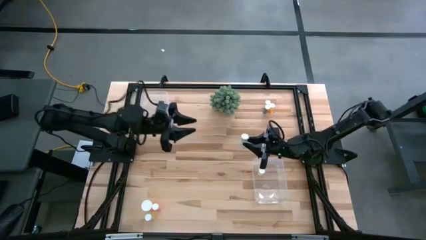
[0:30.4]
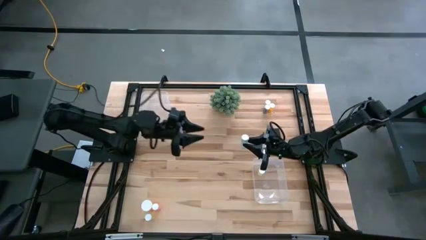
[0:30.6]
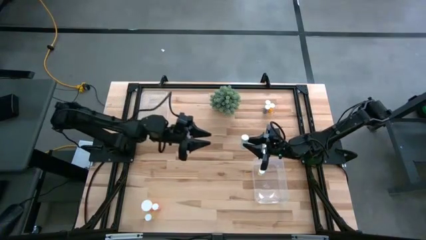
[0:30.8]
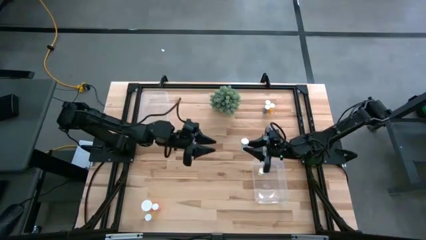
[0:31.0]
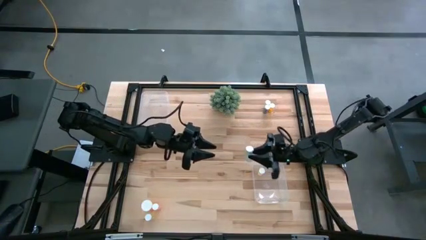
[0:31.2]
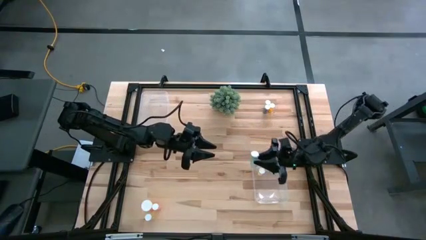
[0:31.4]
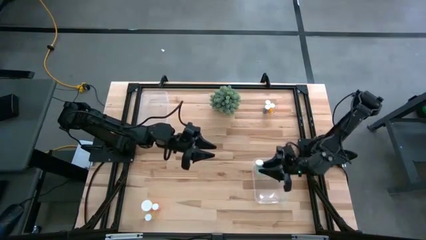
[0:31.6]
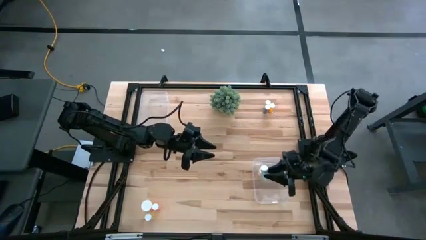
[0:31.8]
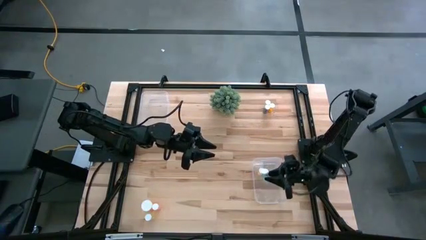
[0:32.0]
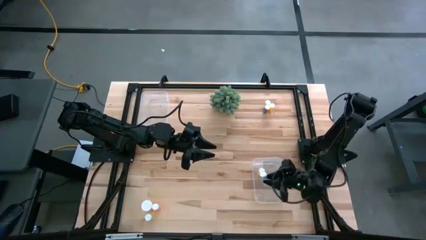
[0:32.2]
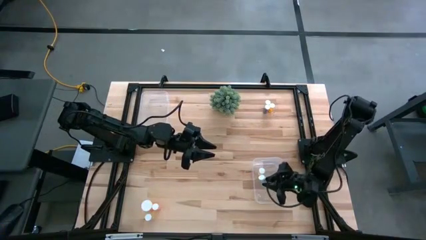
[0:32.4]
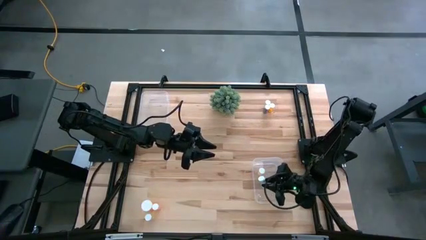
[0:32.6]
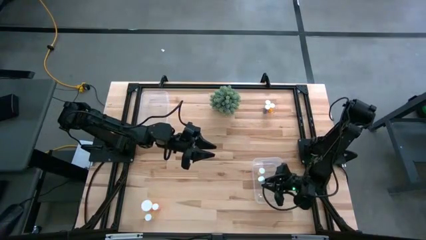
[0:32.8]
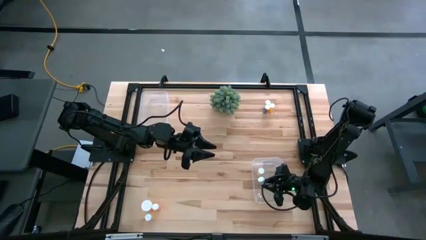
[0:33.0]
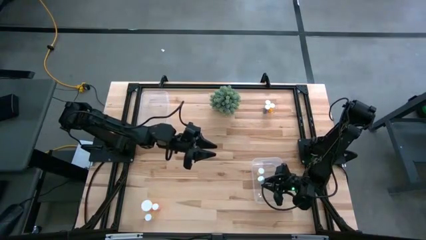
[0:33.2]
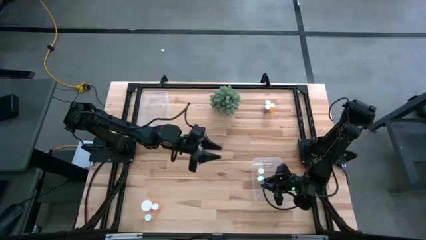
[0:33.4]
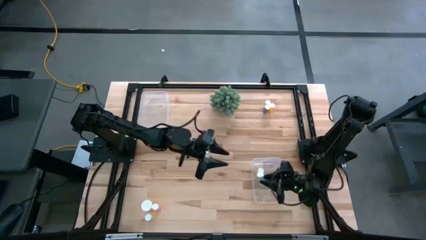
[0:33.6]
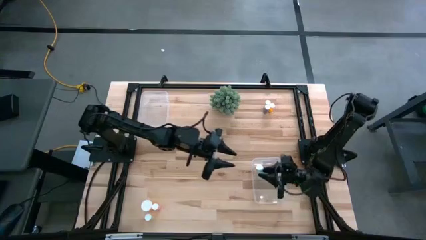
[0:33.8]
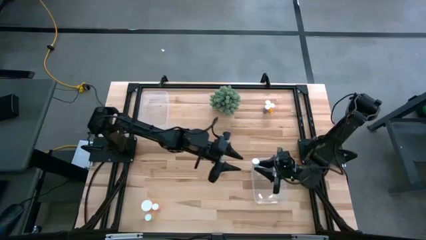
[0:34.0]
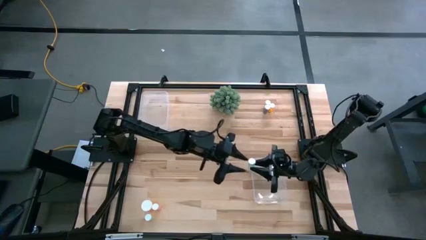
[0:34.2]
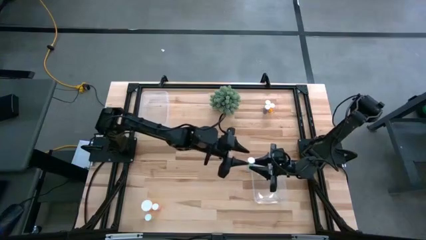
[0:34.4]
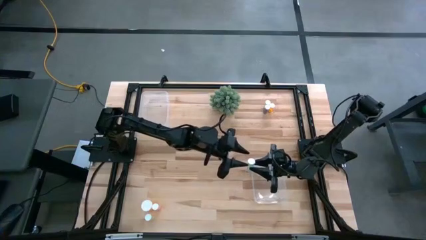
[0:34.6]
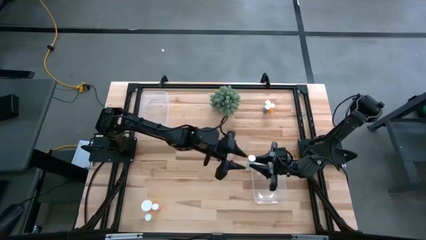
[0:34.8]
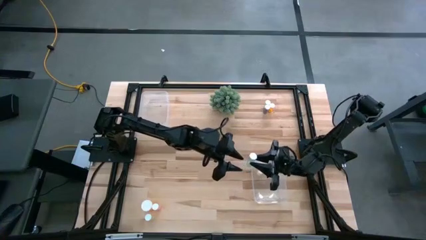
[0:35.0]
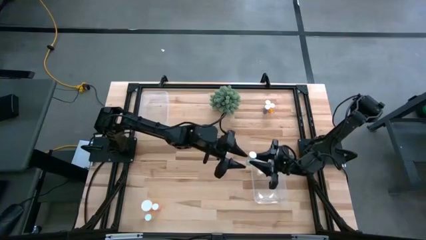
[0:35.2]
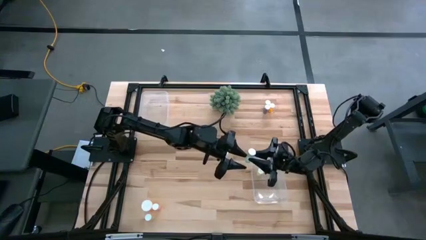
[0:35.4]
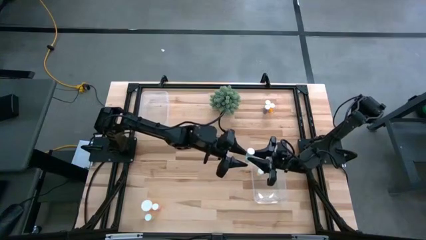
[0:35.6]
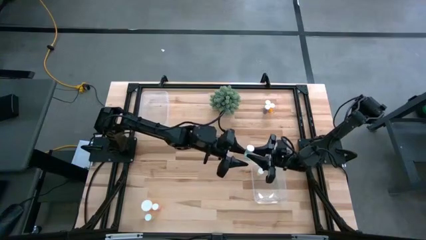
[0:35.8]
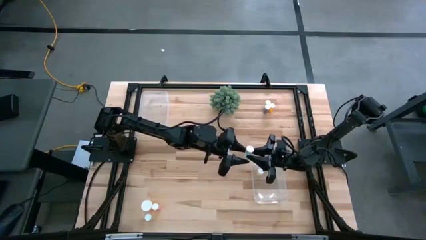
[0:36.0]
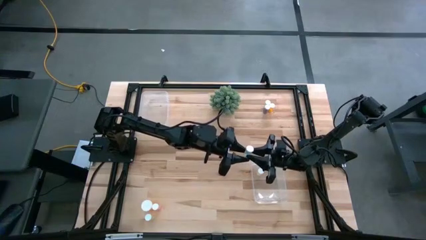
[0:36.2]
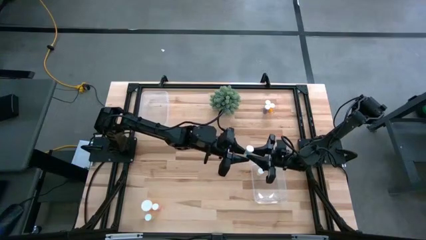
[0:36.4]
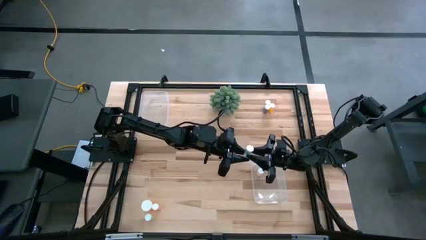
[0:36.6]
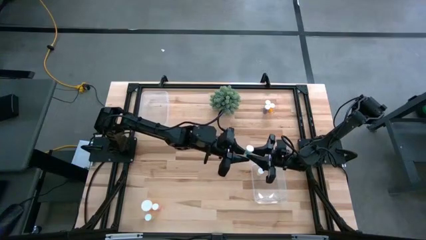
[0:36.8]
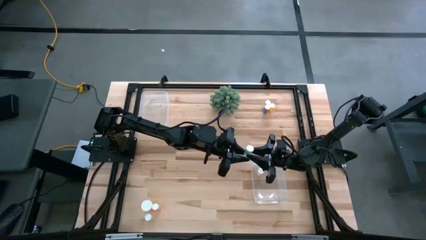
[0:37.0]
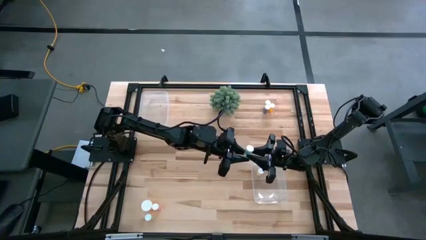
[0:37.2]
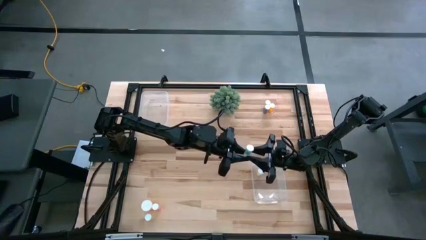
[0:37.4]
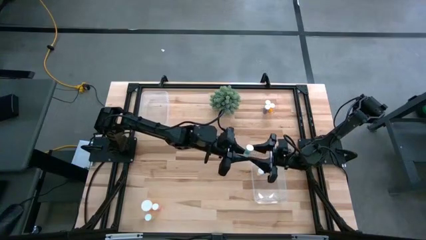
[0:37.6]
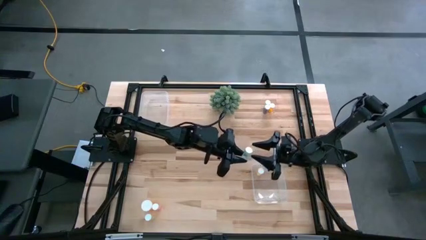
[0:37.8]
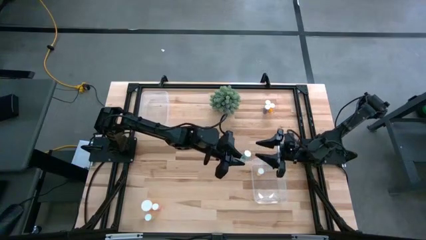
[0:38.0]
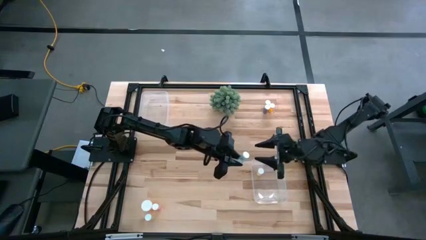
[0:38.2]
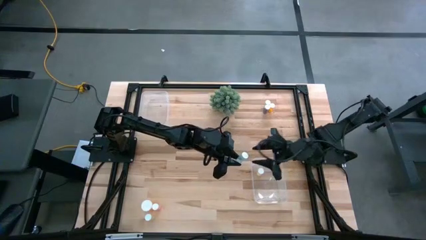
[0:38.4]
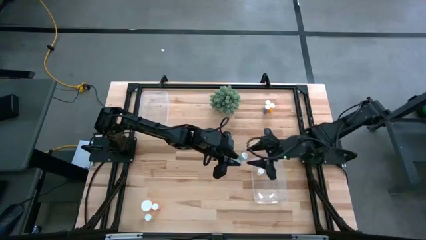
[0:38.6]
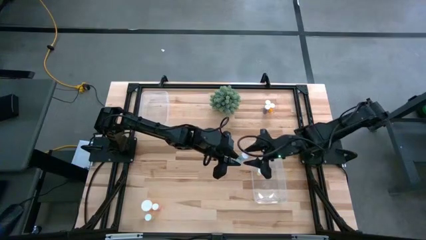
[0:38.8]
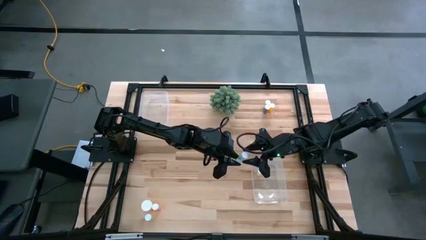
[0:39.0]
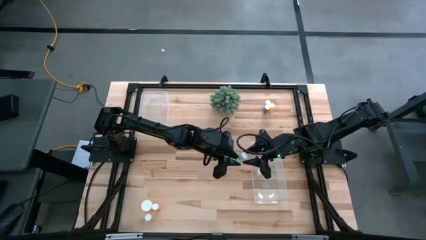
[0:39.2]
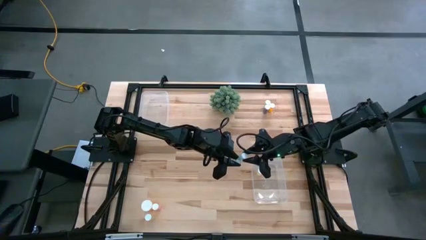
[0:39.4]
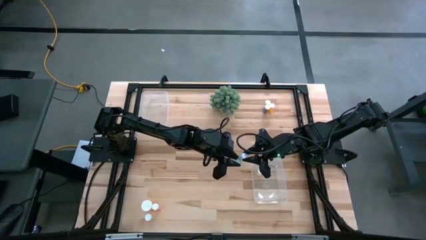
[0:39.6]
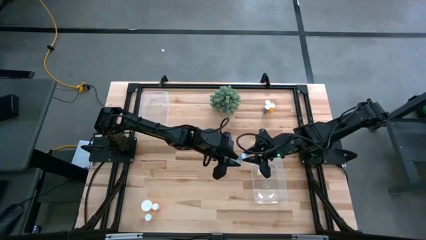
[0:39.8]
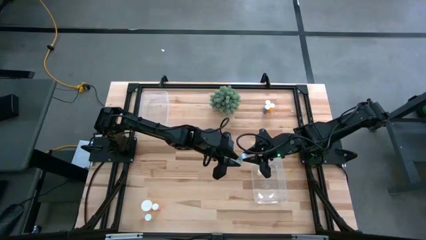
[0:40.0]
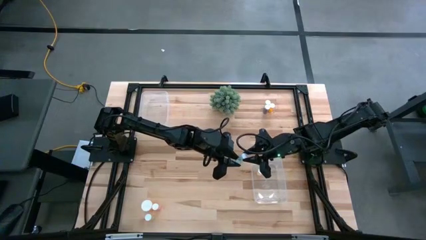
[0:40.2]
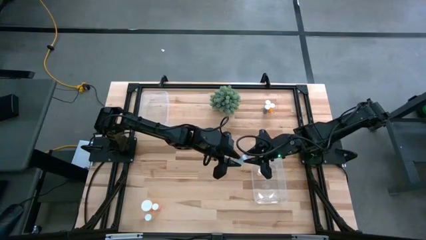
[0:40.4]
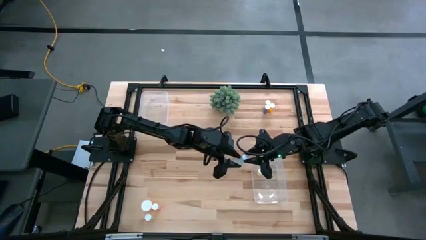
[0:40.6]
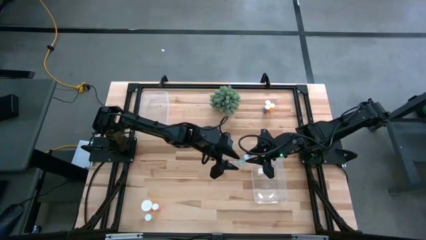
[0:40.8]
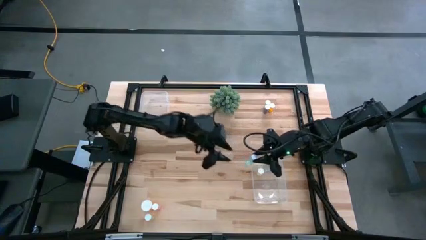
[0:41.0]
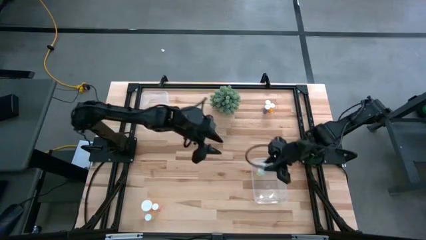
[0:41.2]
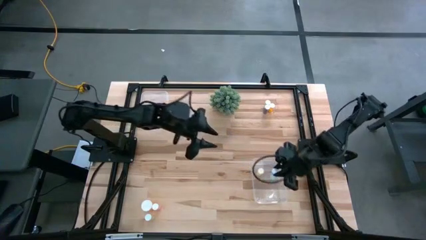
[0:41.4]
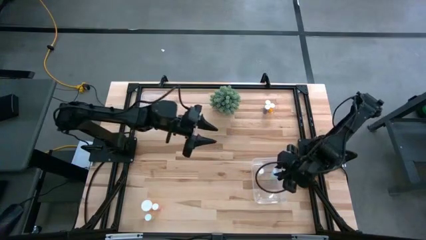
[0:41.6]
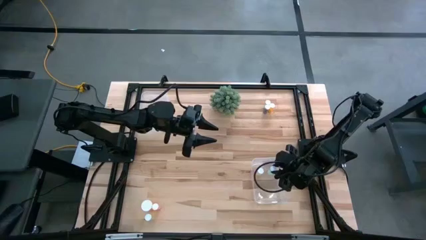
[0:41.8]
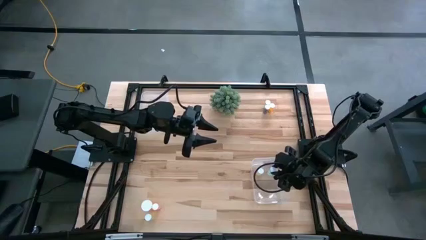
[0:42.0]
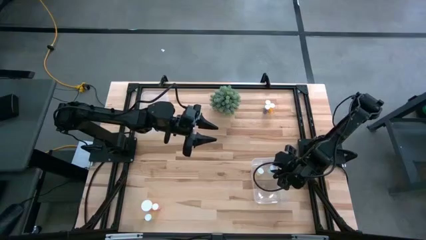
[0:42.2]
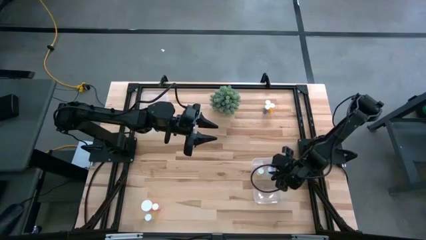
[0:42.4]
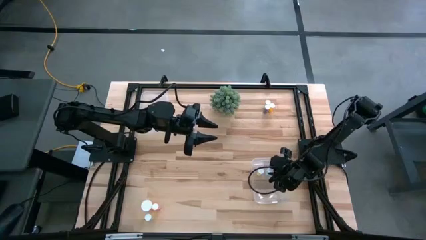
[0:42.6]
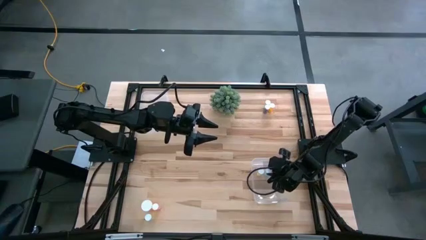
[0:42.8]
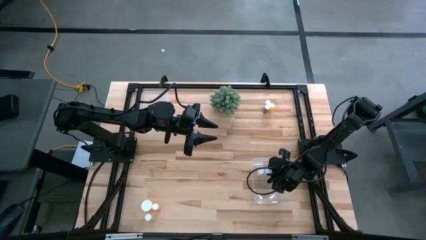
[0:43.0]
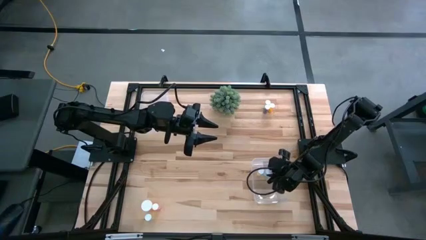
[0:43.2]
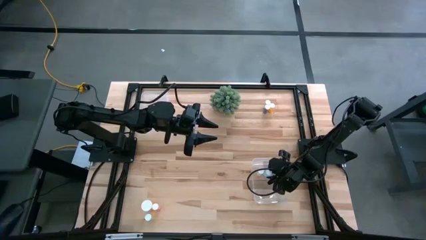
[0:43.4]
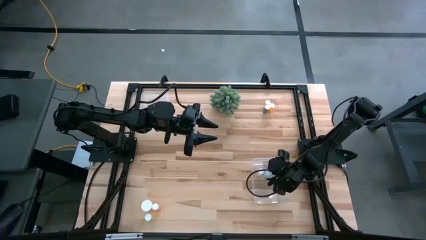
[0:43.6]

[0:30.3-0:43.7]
Task: Pick and place medicine bottles into bin by pill shape (circle, oval)
Put the left light blue tablet bottle into the right transparent bin

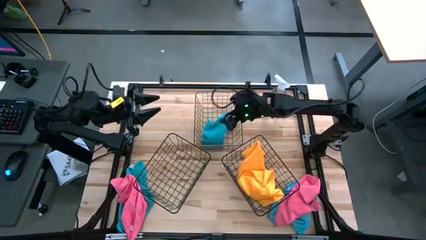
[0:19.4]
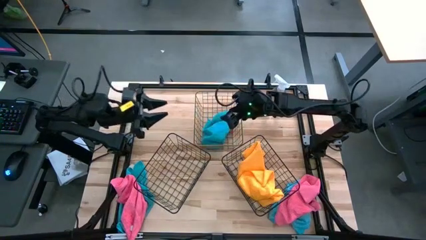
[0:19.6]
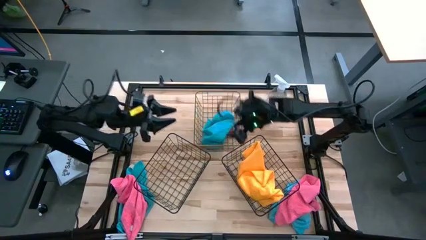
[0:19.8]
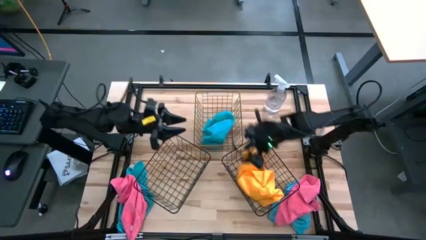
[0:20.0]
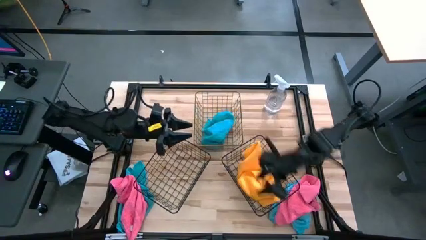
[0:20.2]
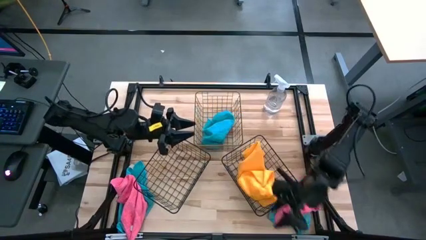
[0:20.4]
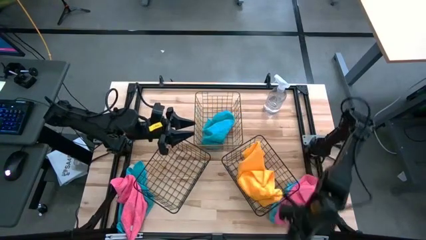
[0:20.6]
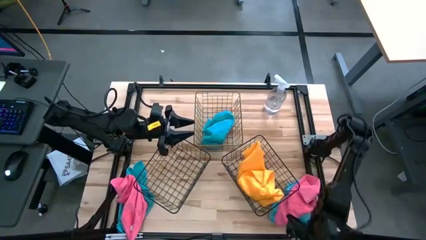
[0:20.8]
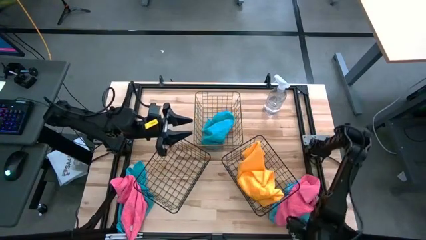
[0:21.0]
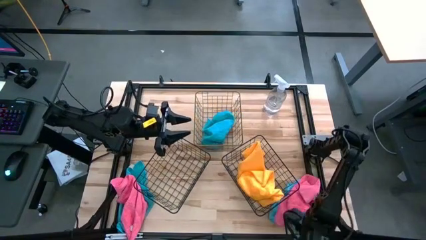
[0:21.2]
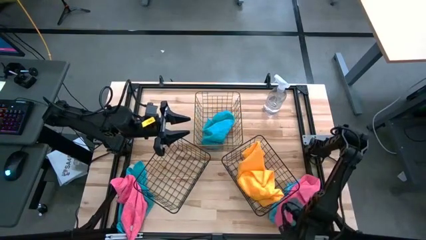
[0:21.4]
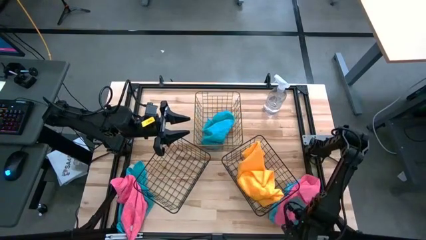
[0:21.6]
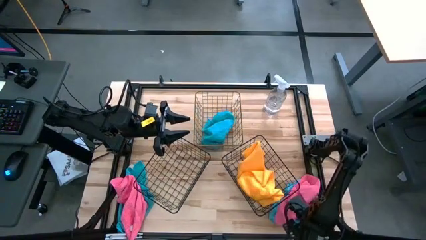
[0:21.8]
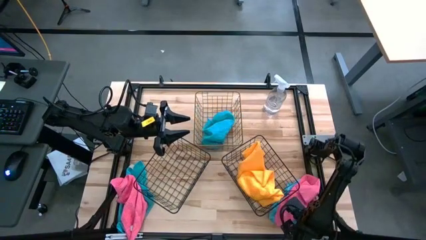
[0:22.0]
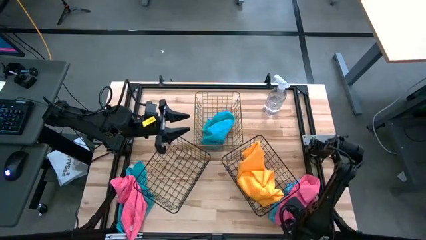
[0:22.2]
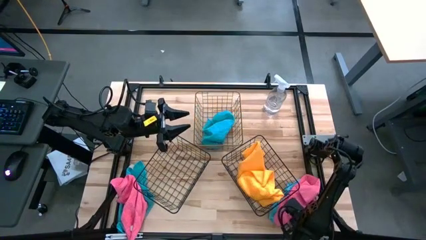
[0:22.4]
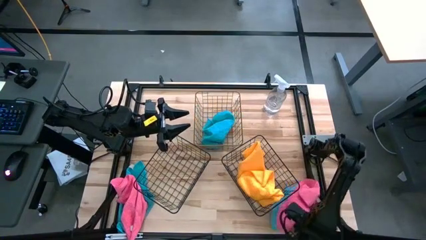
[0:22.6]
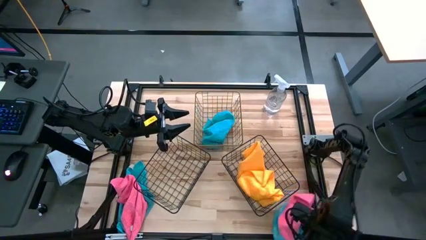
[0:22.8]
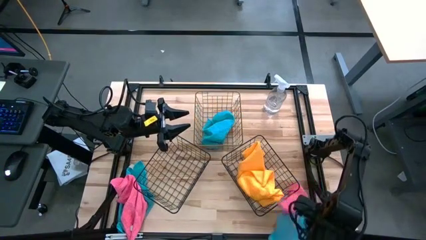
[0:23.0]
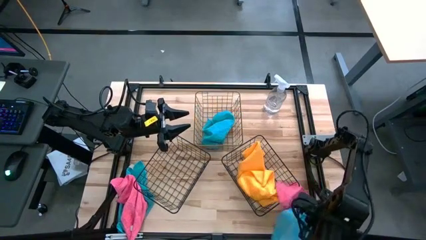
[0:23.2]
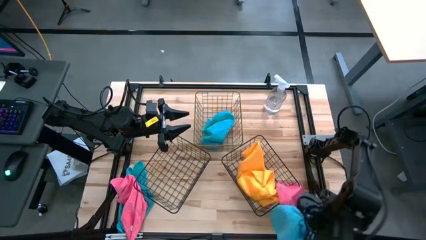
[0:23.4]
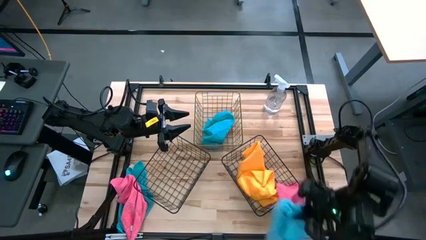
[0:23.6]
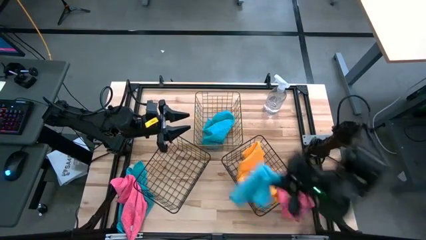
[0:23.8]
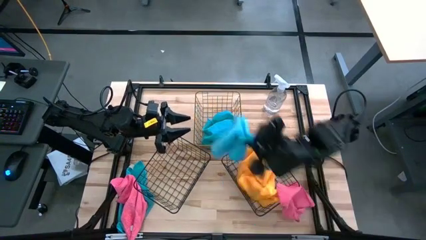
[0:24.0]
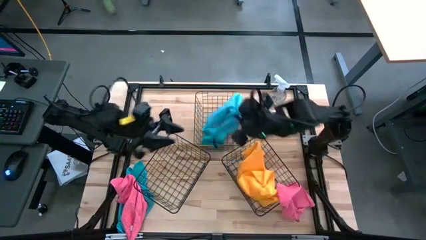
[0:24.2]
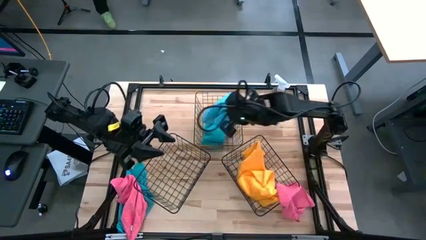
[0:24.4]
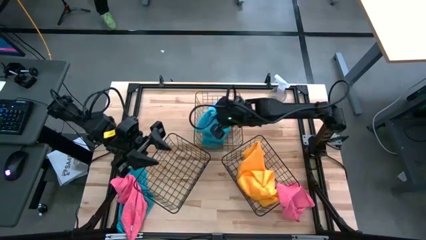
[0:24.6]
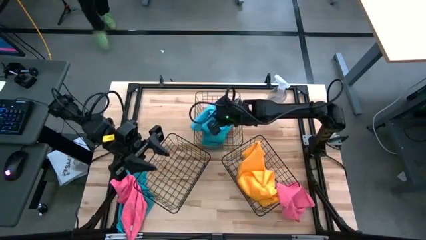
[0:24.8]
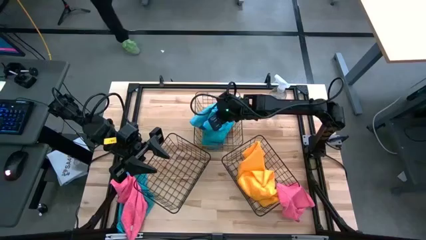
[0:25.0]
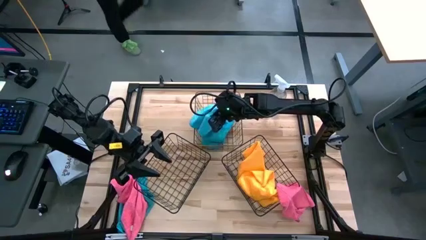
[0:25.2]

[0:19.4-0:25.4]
Task: Sort microfiber towel by color & place in baskets
Put the right blue microfiber cloth into the top wire basket
